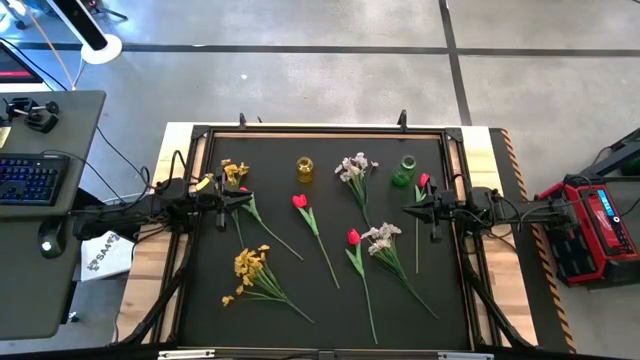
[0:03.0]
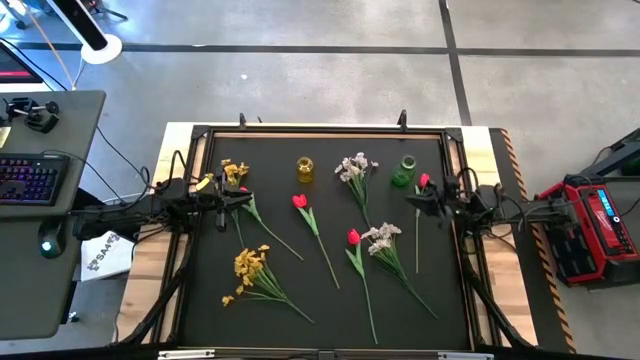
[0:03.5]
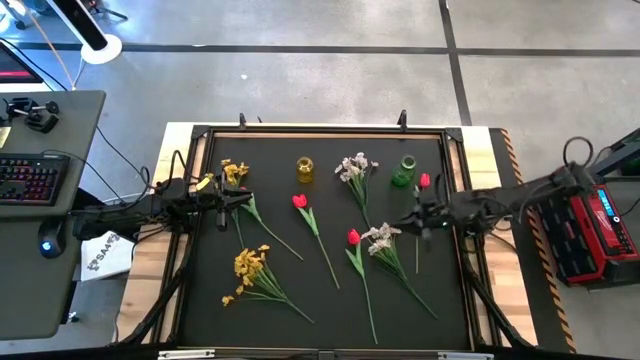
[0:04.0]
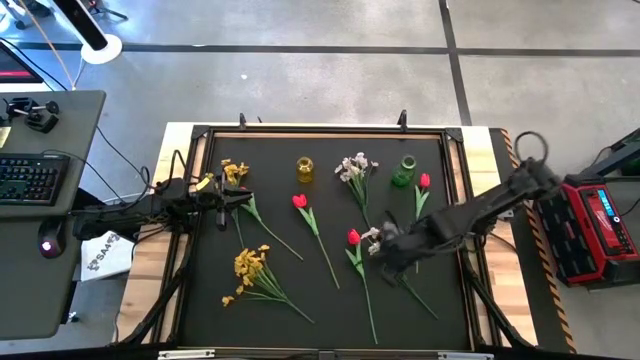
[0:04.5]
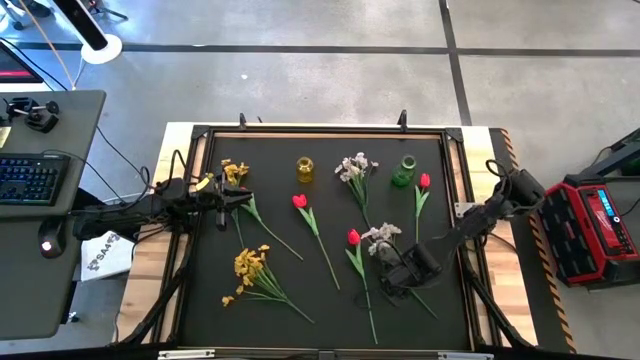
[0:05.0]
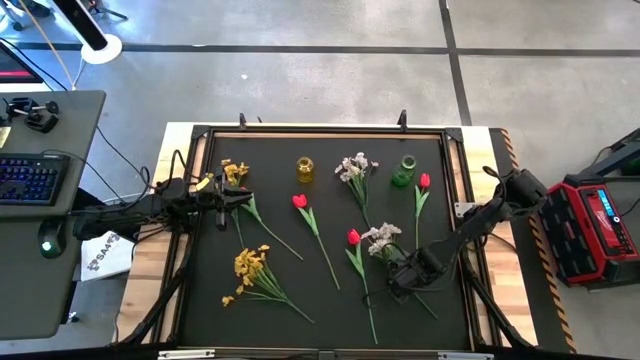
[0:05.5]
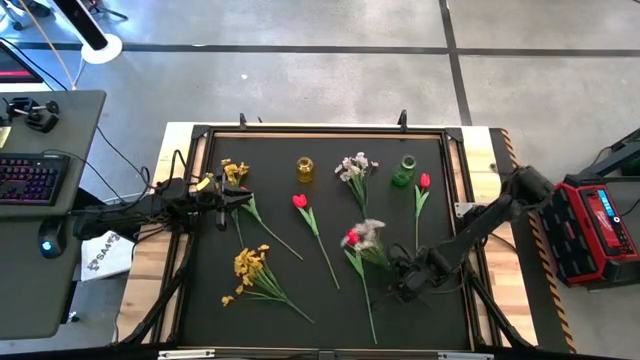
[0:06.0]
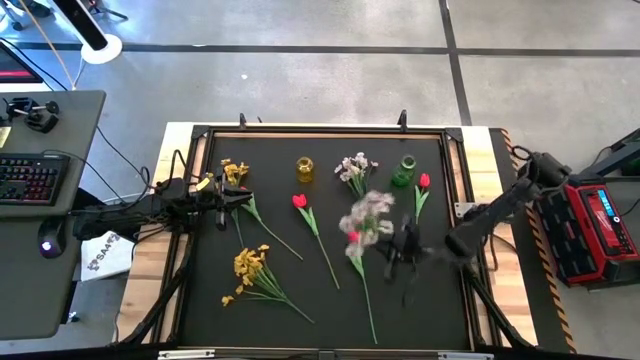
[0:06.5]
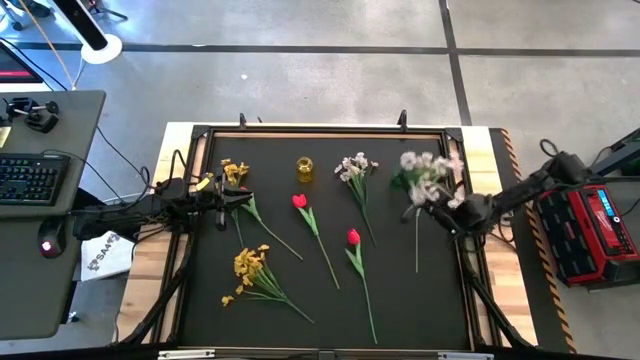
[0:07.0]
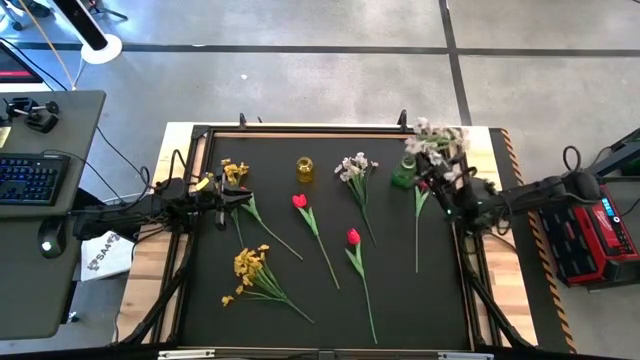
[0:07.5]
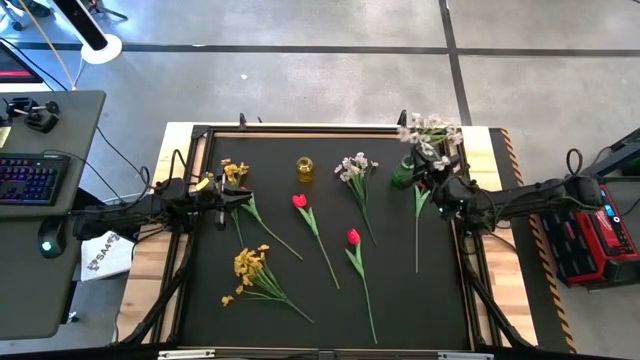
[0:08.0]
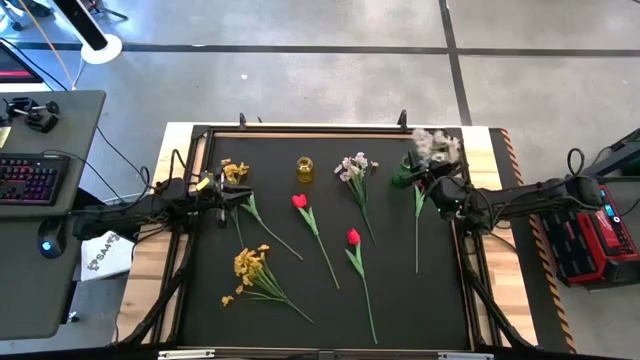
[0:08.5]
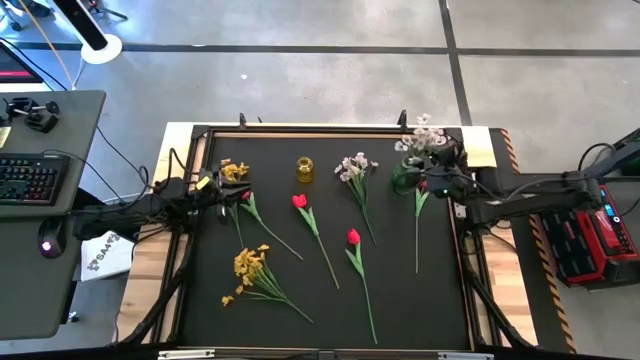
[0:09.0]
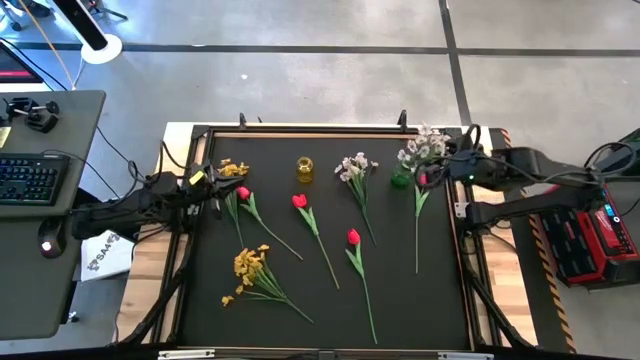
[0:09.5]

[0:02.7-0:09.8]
Task: Sort flowers into vase by color
Put the white flowers into the green vase

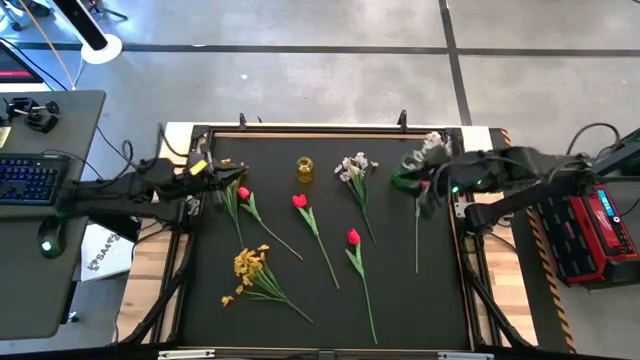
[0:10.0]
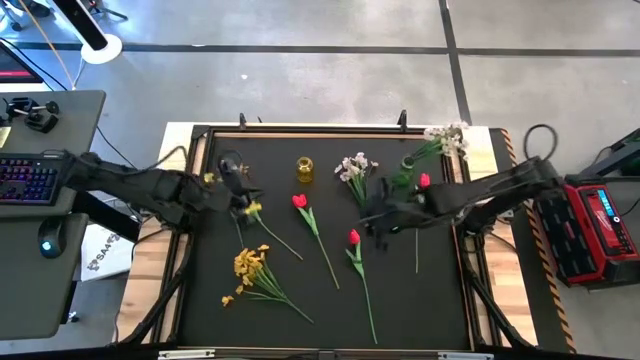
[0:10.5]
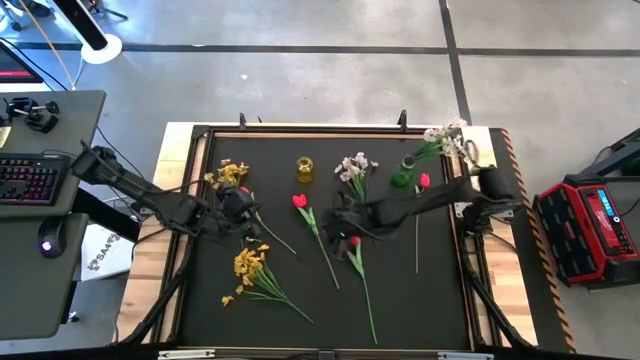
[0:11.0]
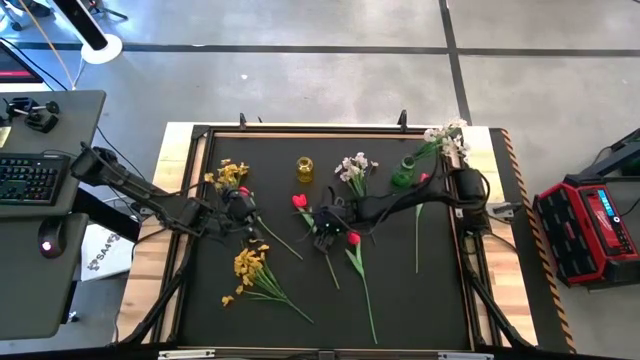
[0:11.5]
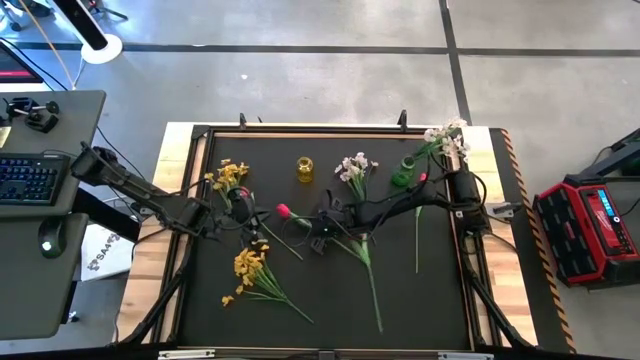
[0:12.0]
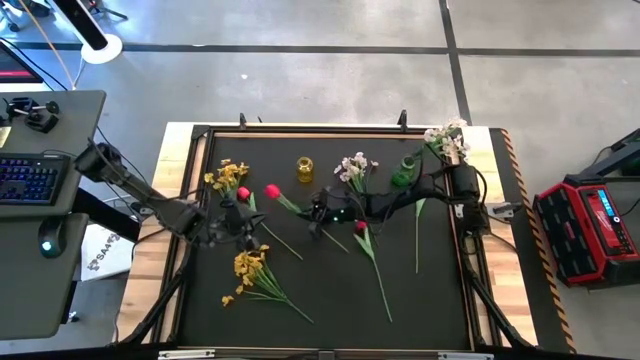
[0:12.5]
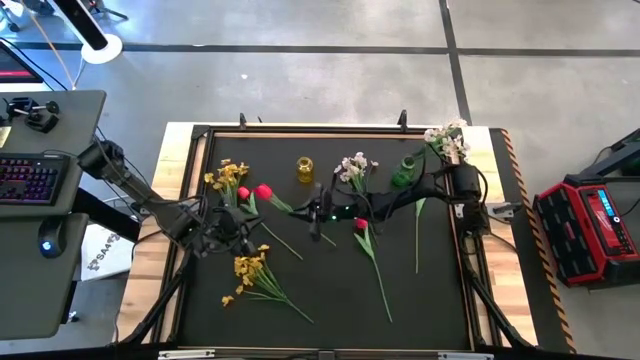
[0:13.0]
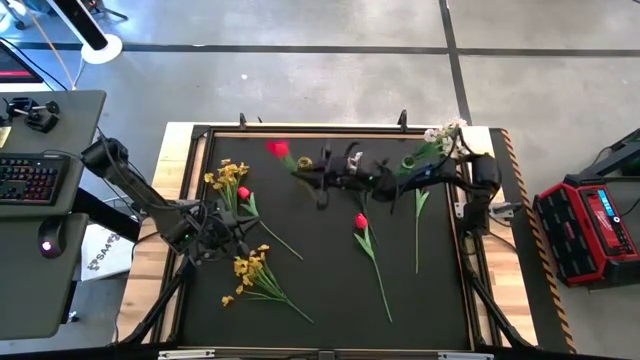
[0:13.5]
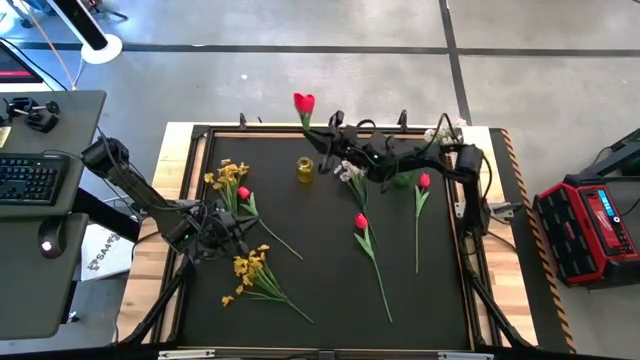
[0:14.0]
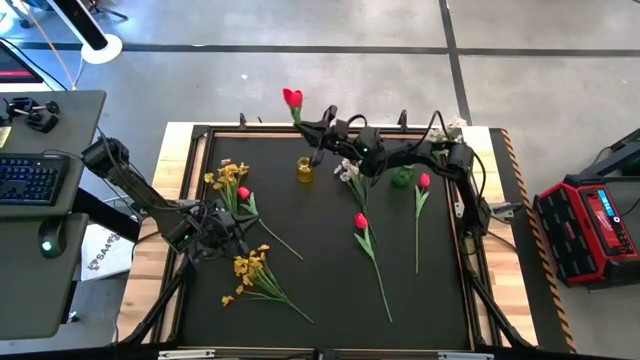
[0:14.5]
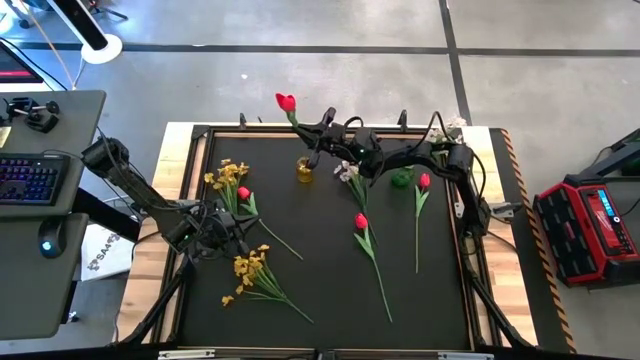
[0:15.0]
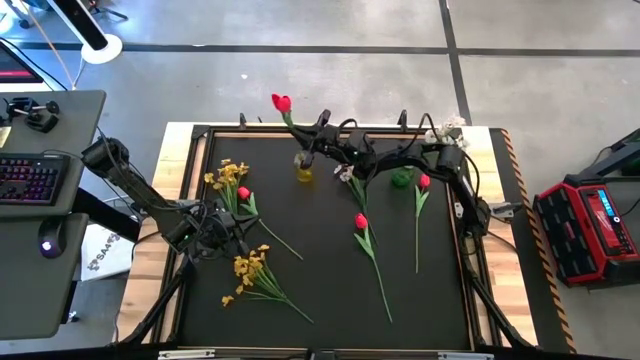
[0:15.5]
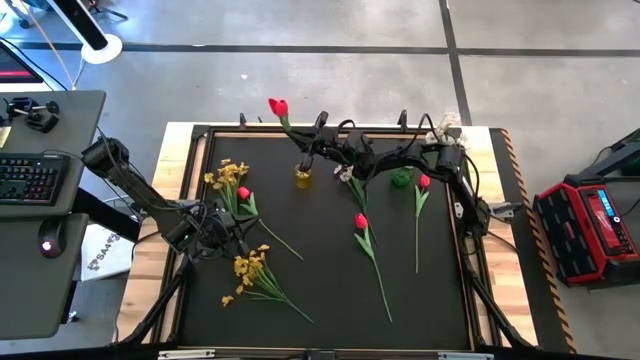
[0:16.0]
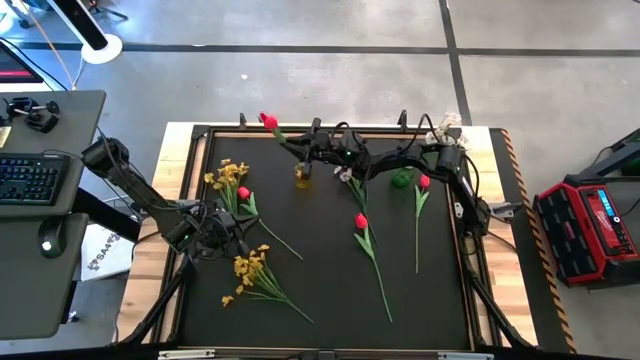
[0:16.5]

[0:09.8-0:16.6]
Put the red tulip into the yellow vase

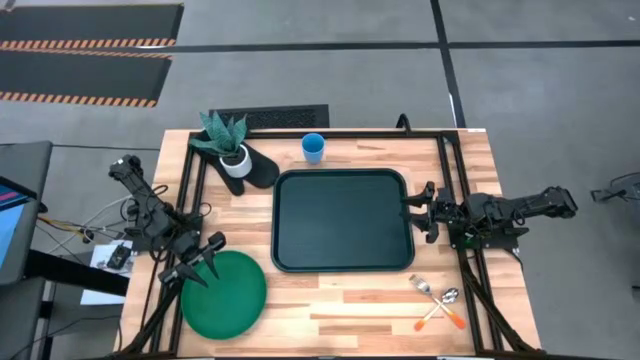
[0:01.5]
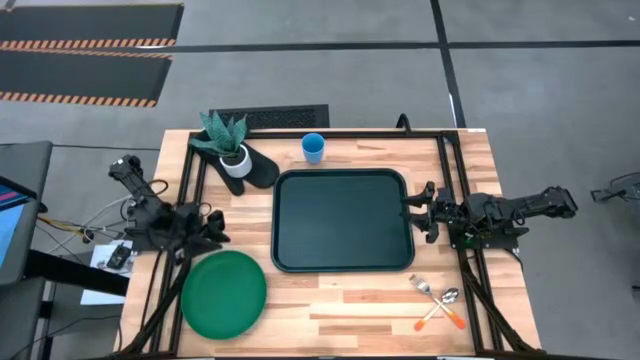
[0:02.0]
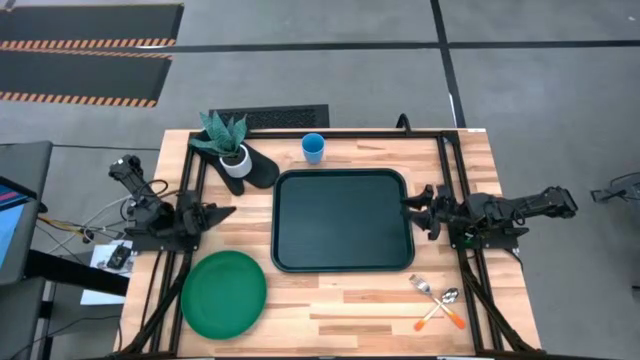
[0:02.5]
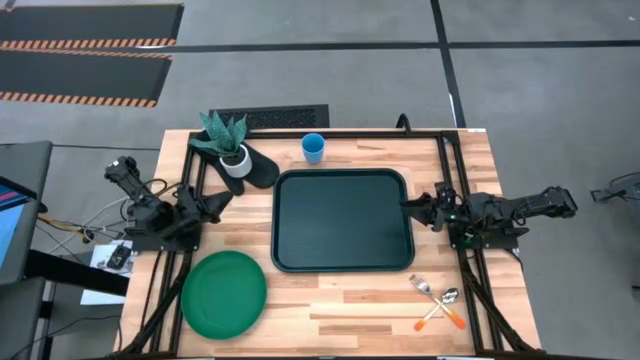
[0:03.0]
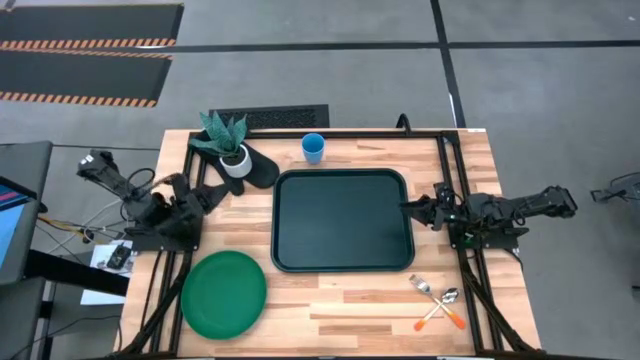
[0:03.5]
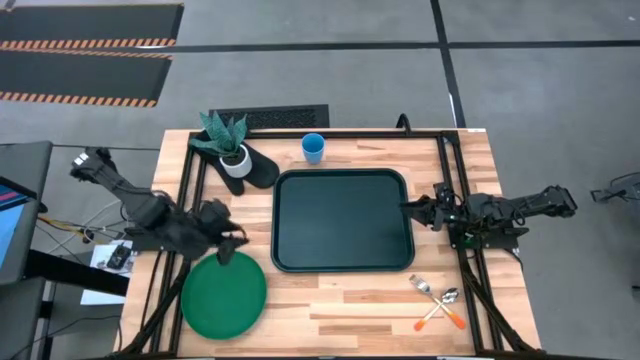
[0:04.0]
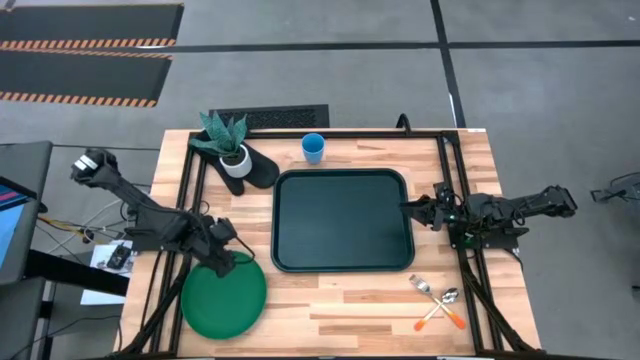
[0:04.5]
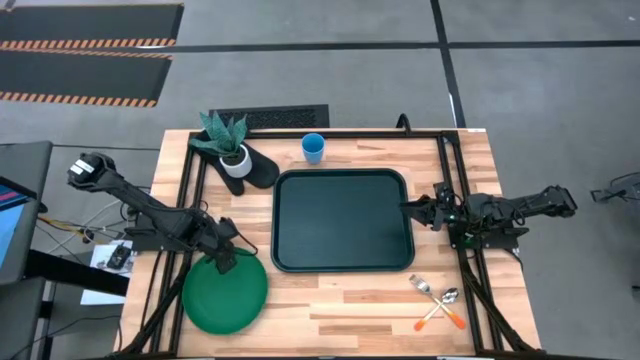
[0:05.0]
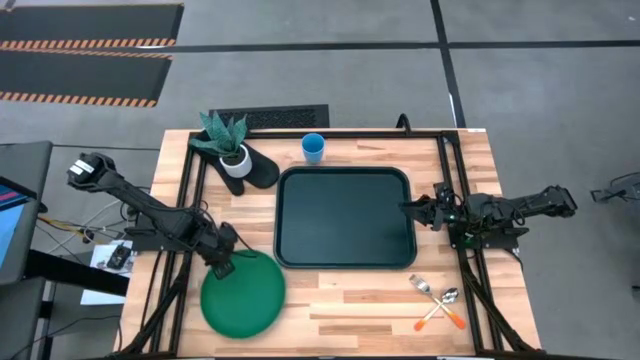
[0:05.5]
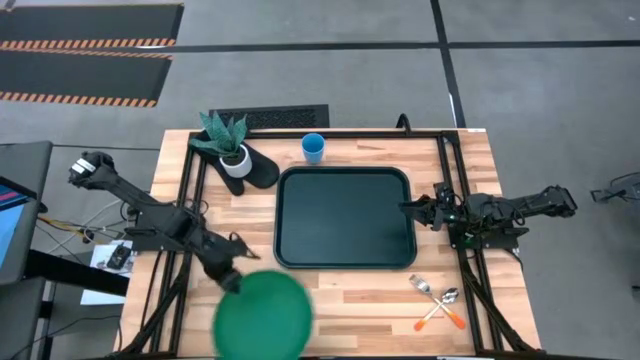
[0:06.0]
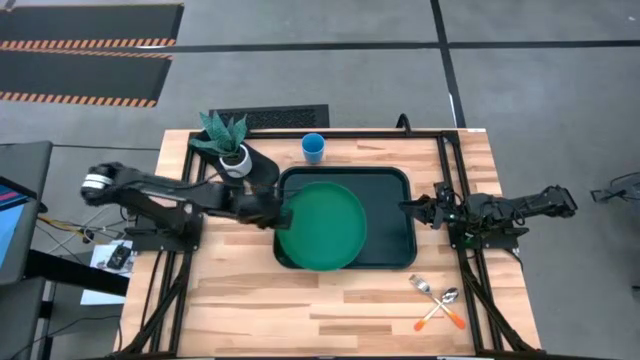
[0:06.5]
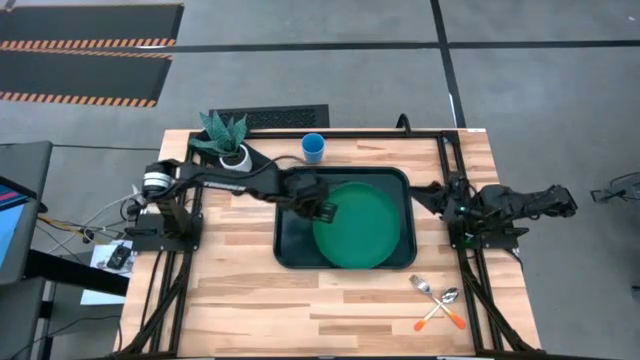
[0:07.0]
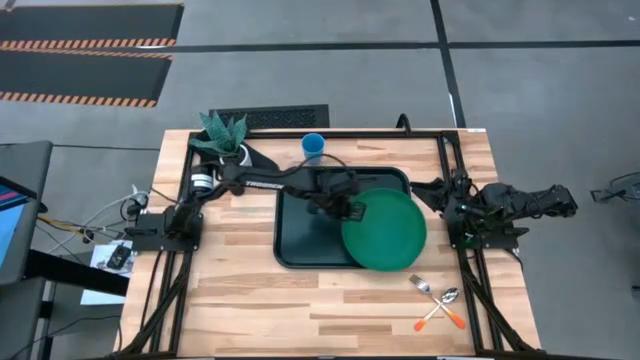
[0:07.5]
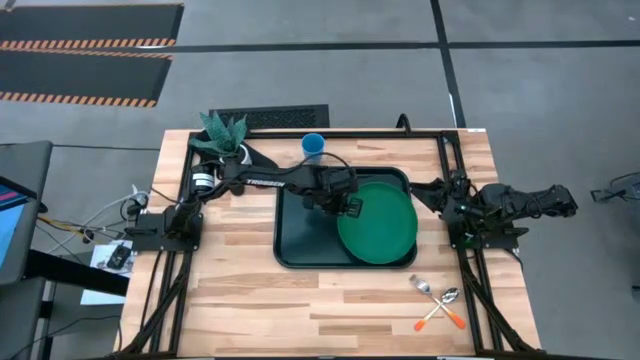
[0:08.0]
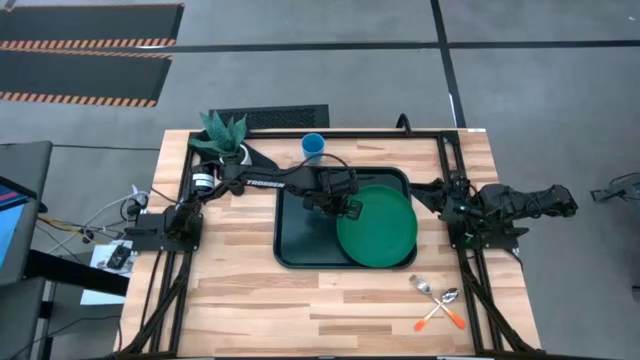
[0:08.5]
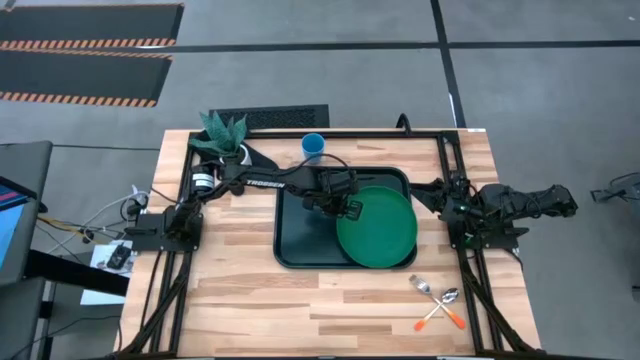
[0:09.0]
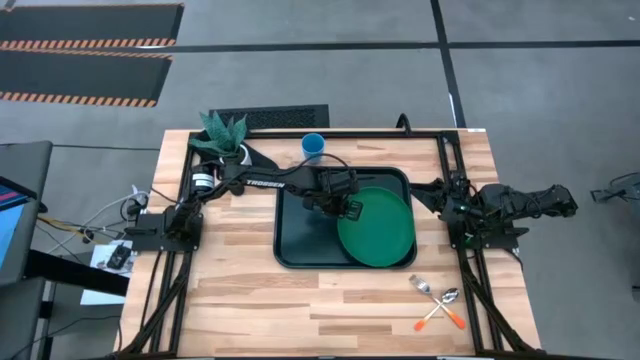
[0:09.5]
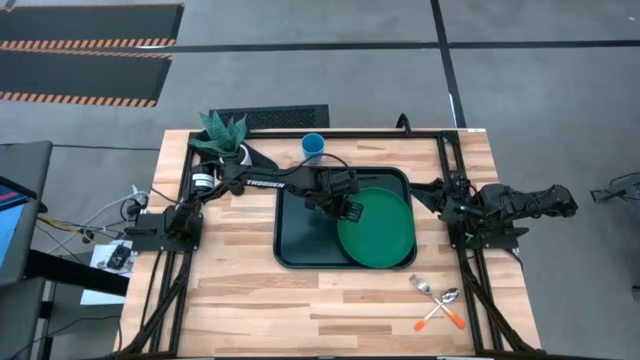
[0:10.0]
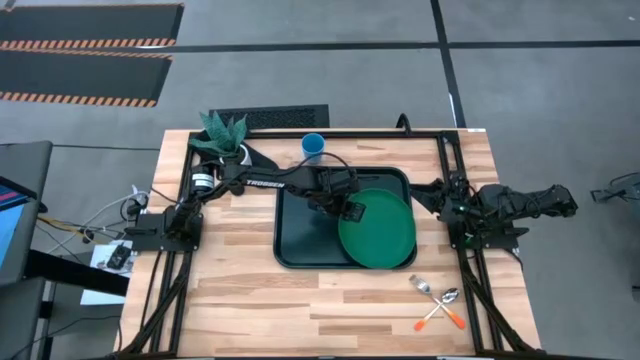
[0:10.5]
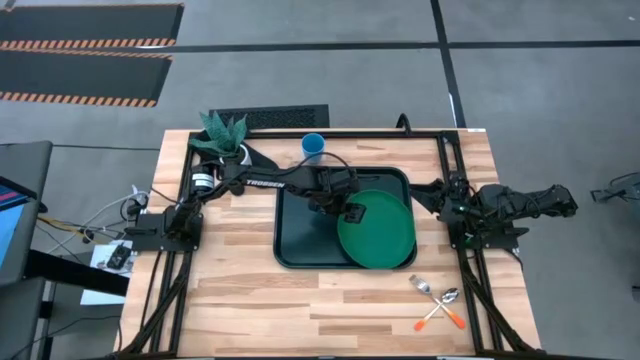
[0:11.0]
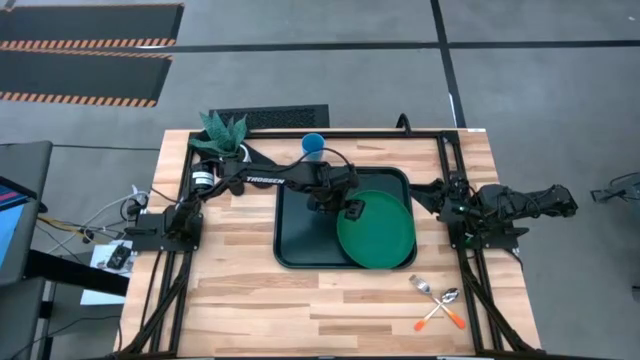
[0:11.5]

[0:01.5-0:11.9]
Task: Pick and place plate/cup/fork/spoon on tray
Put the green plate on the dark green serving tray
